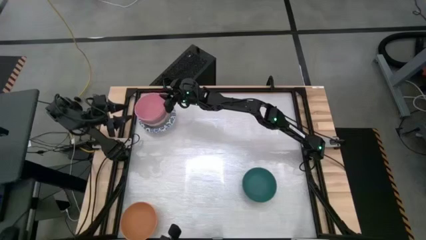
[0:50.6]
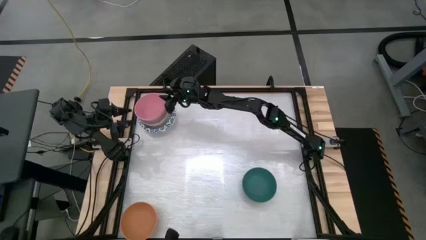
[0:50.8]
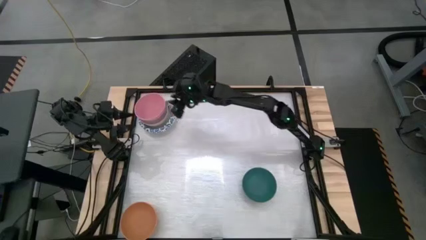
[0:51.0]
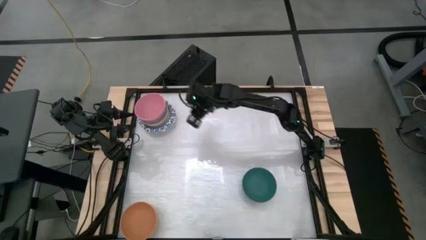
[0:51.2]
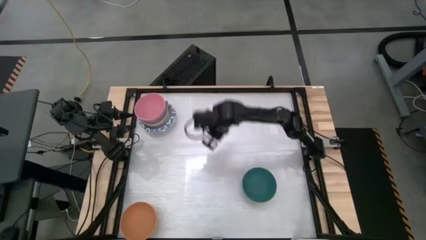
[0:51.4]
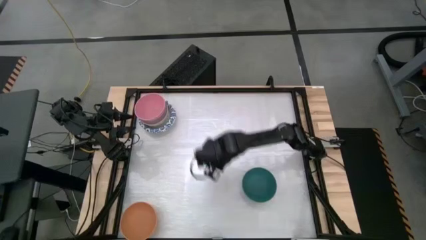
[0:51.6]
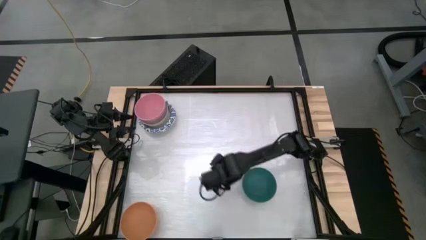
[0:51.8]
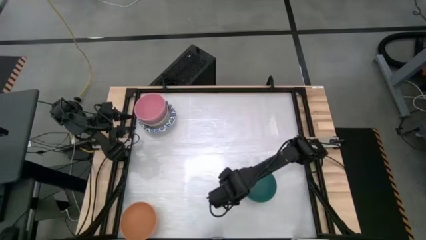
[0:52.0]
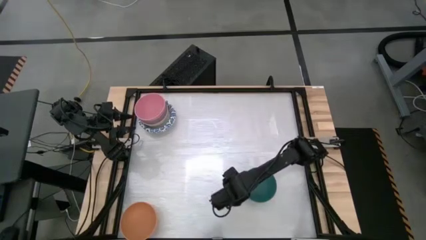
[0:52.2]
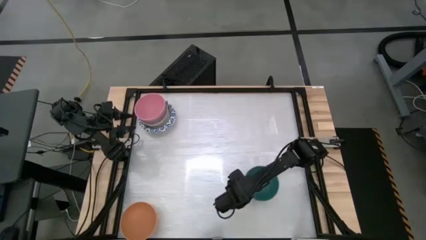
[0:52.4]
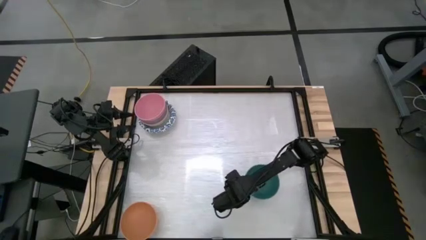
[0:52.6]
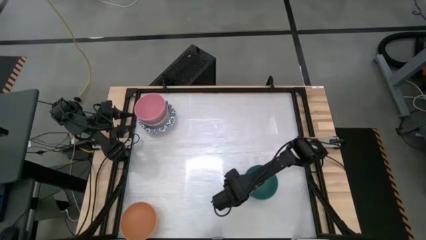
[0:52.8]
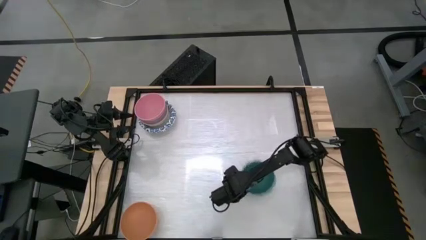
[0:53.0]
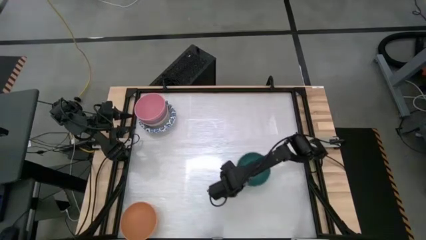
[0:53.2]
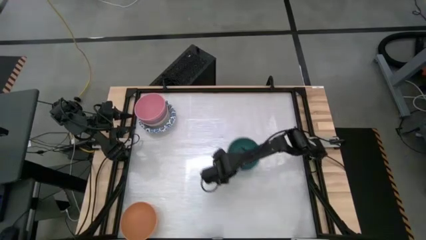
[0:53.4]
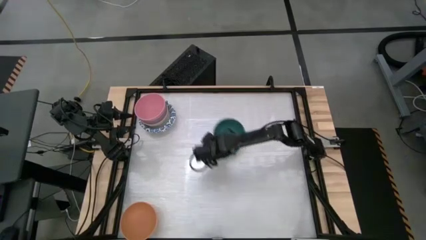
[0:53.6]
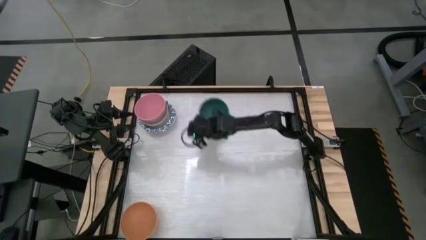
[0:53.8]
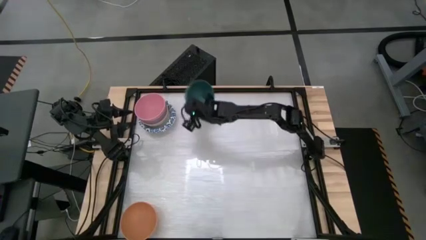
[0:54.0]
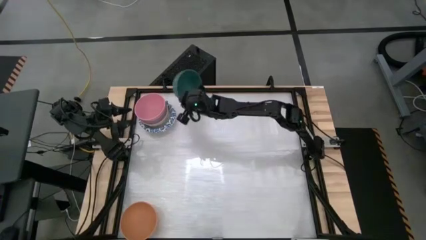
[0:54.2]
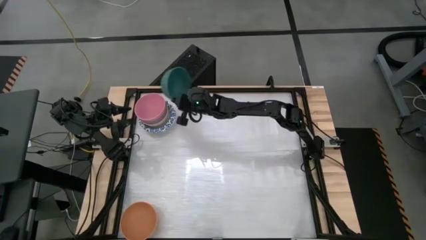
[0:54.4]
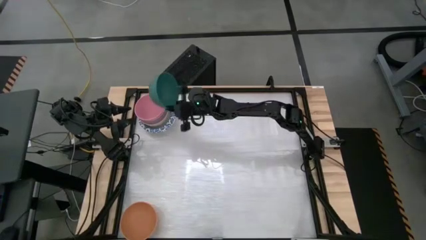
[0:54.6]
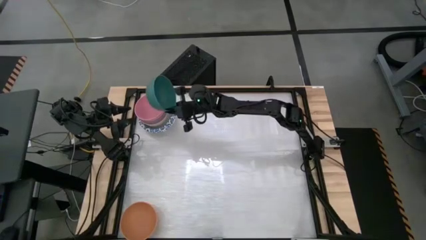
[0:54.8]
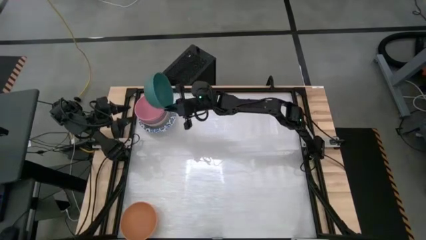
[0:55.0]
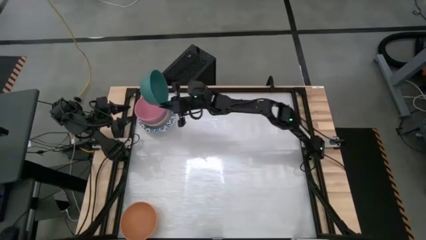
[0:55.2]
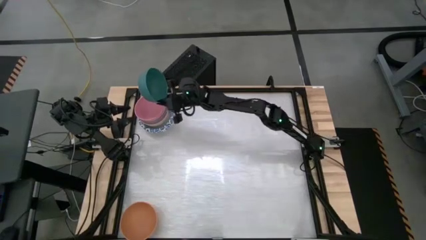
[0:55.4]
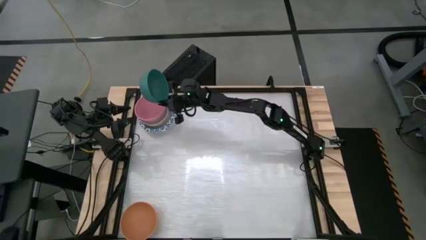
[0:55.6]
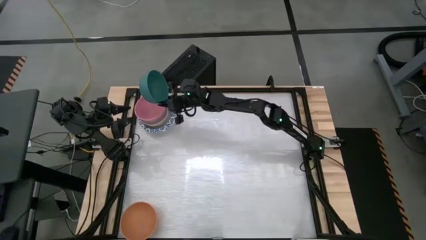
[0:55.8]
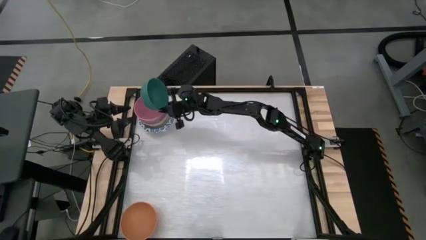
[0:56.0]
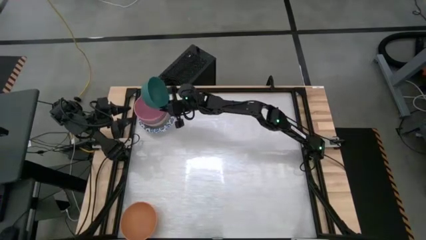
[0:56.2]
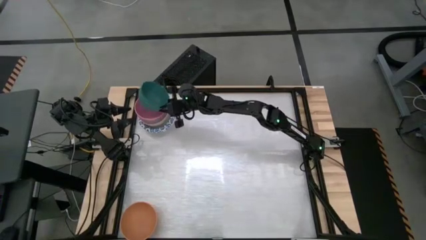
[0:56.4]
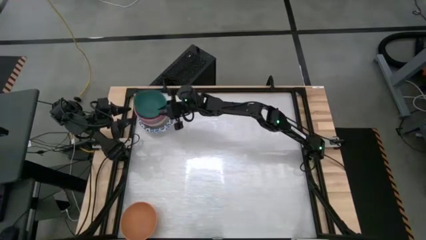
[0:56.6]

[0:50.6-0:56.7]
Stack the green bowl on top of the pink bowl

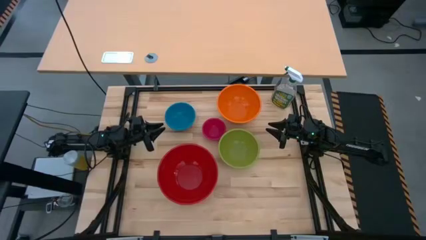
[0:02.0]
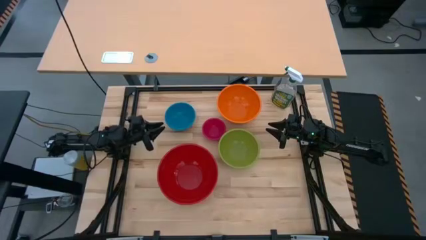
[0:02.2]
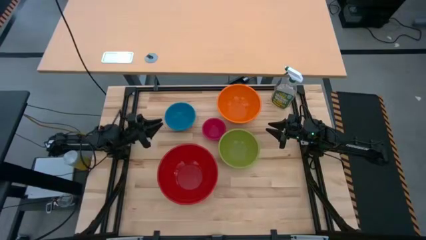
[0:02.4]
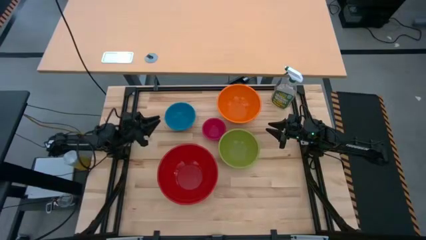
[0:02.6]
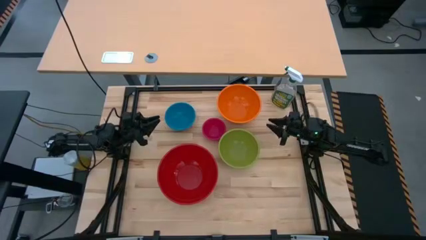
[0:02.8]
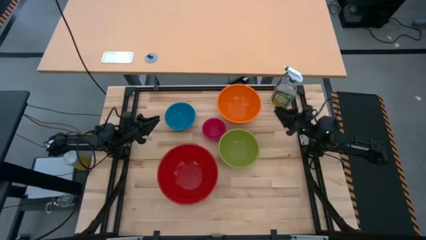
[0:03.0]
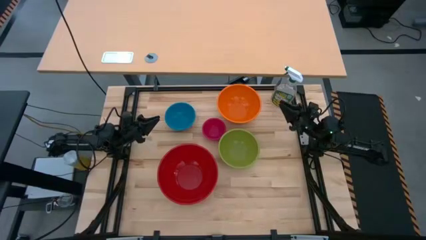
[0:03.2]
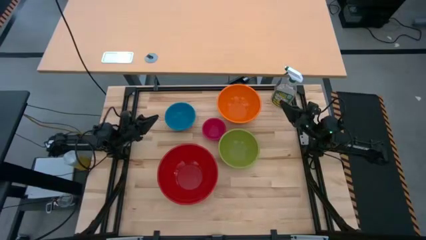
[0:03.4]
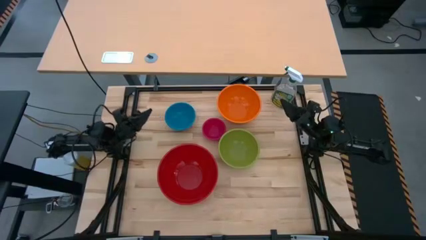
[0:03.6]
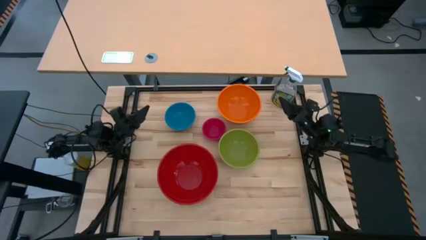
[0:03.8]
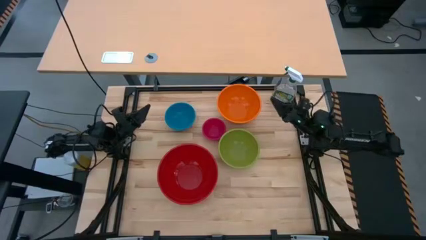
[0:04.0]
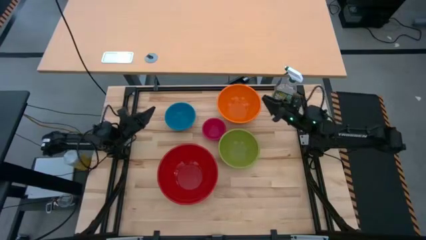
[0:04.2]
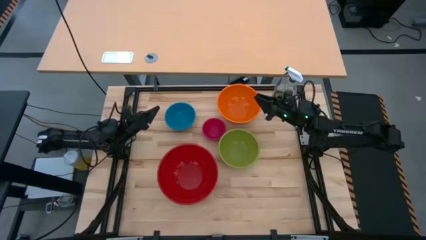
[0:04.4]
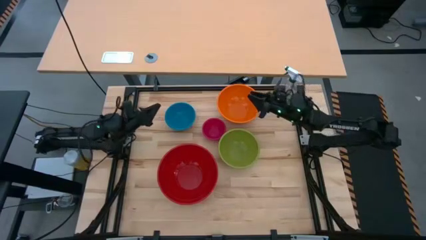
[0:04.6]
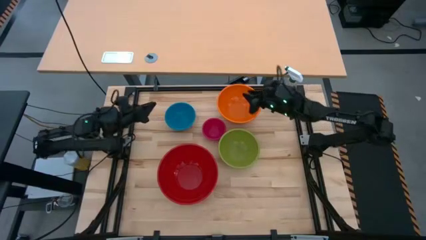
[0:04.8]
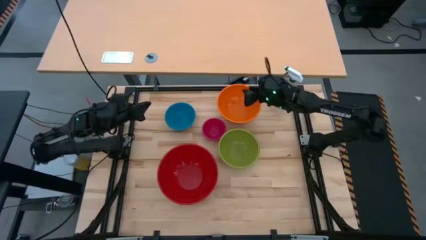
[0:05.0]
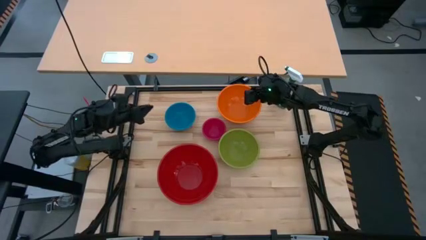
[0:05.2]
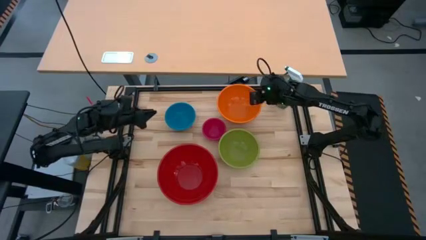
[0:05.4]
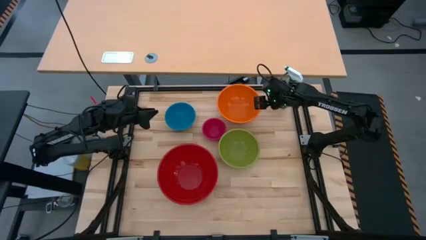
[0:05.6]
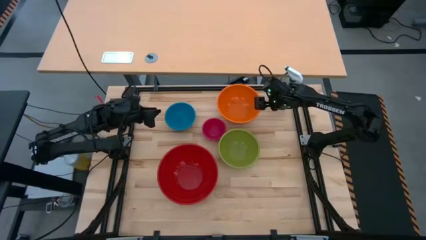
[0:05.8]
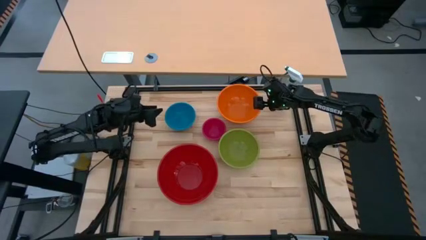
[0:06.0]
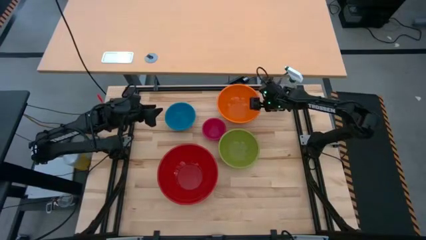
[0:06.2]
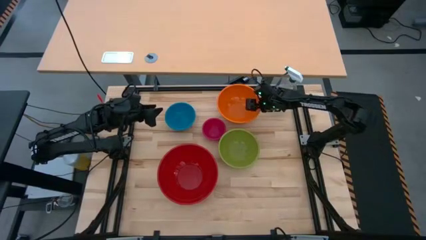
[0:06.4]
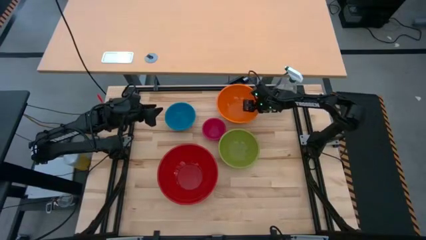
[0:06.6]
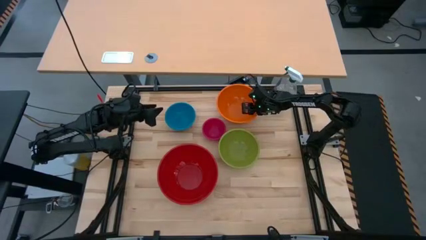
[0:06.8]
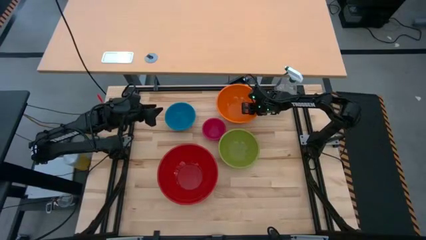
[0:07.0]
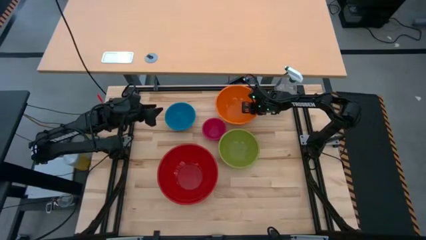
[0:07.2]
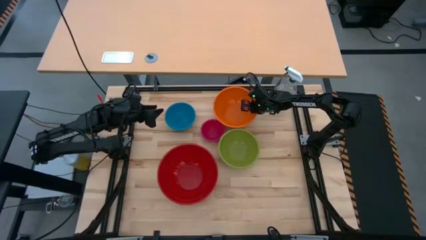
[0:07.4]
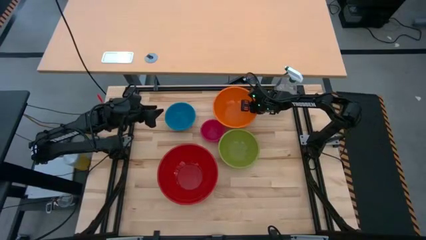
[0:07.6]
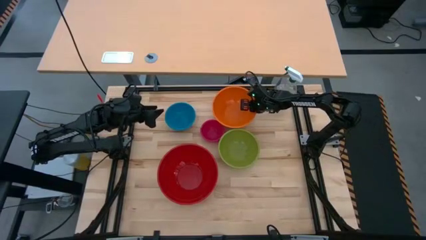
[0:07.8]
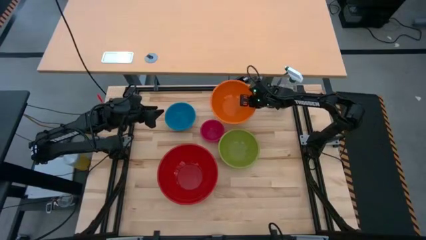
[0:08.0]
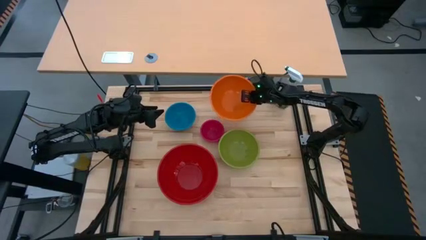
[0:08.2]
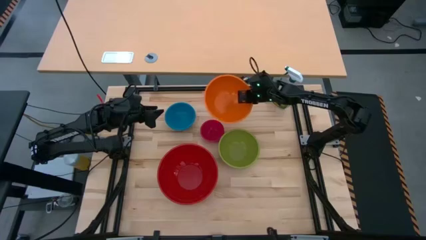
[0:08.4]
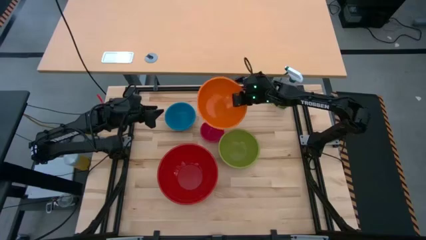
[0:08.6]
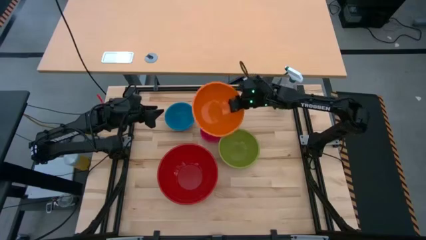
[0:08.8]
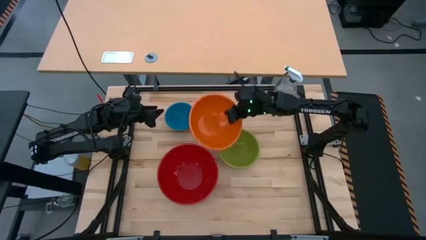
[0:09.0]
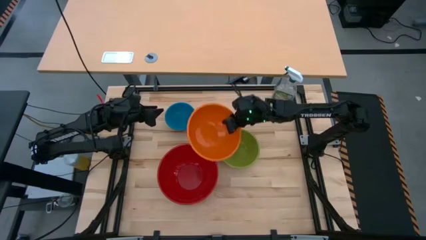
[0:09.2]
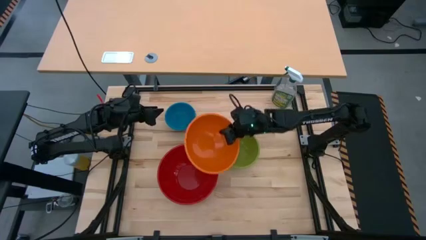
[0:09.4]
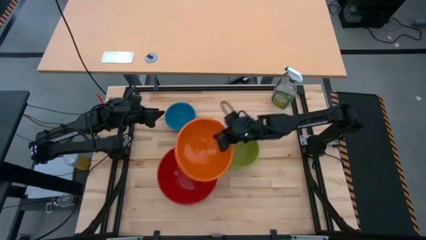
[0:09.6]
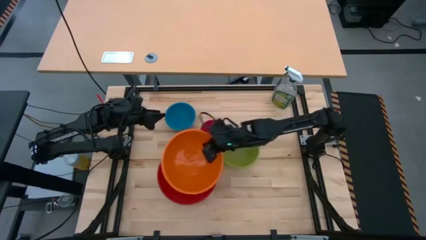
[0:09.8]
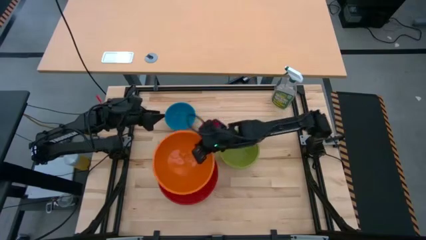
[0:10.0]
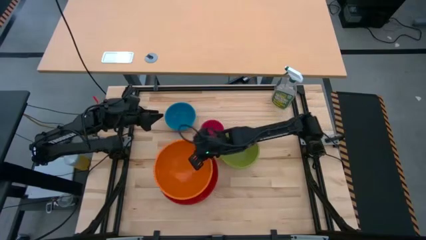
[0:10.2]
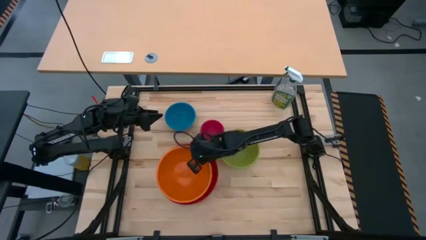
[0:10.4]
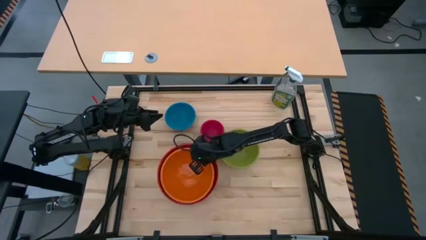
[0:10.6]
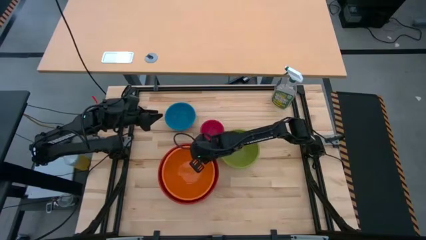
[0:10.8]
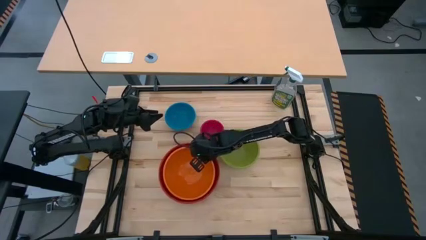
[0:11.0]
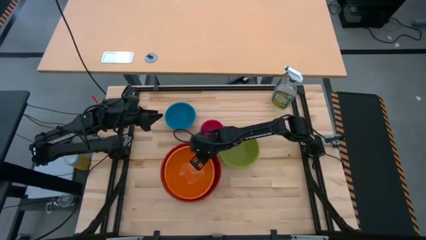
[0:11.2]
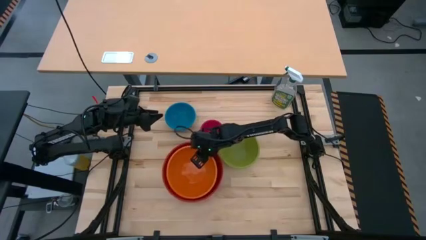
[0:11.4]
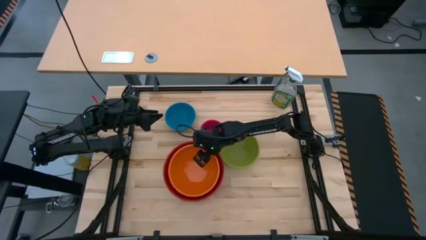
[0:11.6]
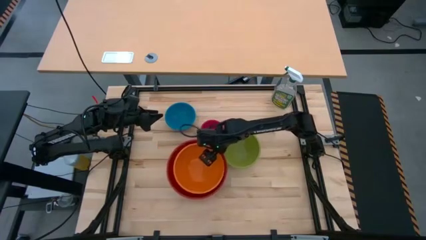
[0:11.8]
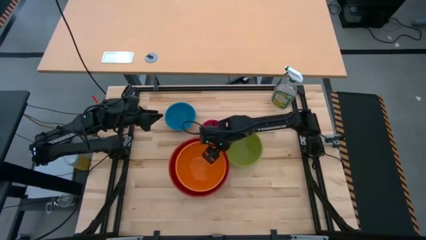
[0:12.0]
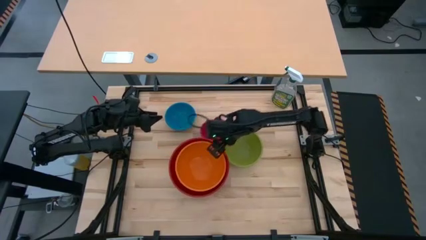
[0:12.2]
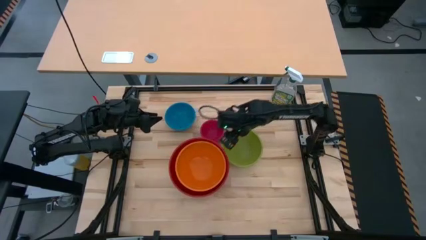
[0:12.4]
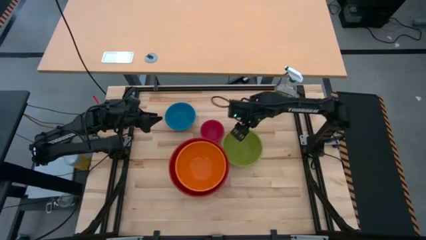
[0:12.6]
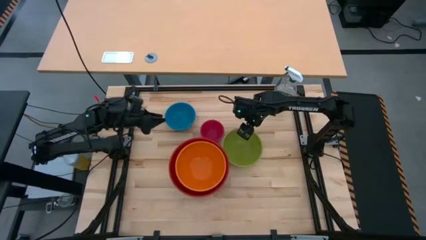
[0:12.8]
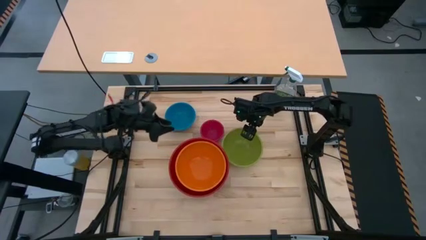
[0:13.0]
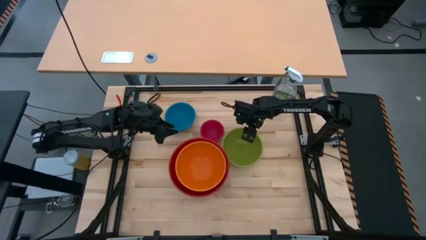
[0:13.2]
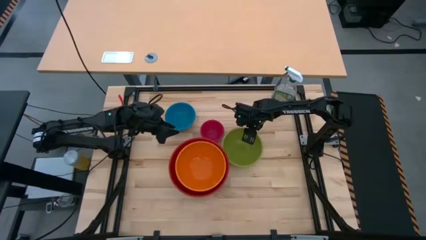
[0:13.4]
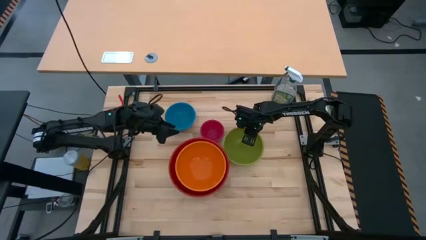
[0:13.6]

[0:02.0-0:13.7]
Stack the orange bowl on top of the red bowl
